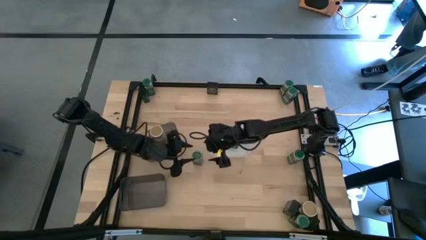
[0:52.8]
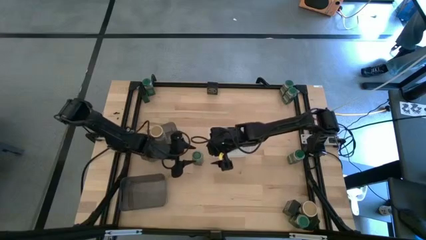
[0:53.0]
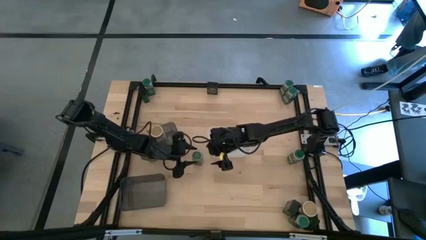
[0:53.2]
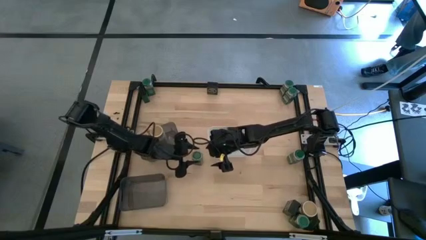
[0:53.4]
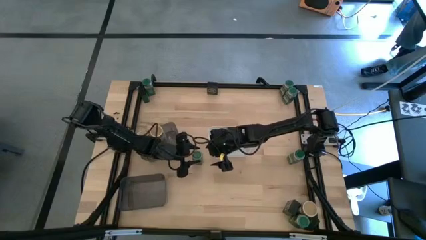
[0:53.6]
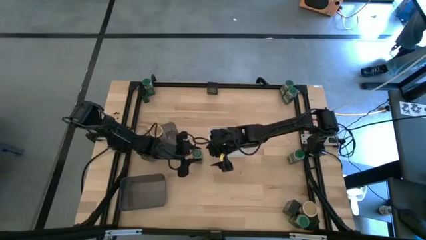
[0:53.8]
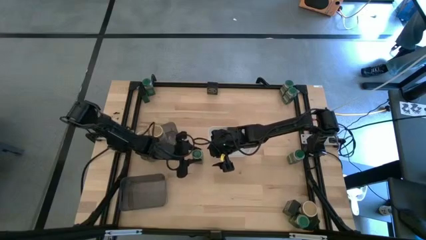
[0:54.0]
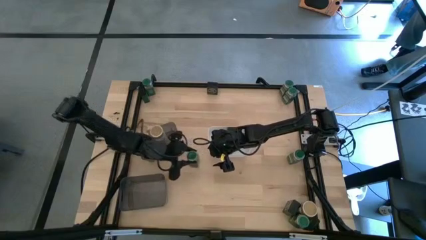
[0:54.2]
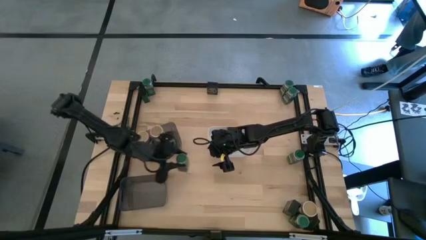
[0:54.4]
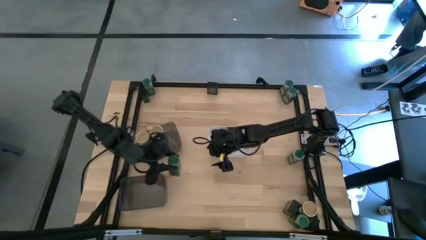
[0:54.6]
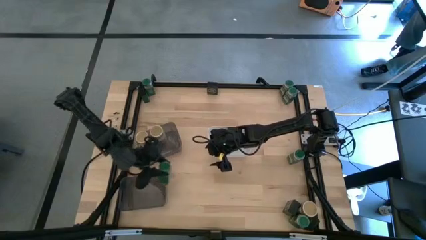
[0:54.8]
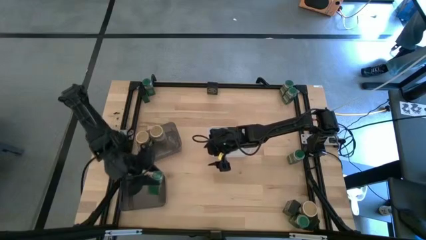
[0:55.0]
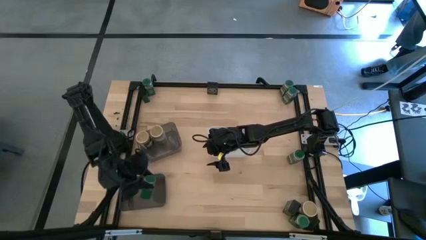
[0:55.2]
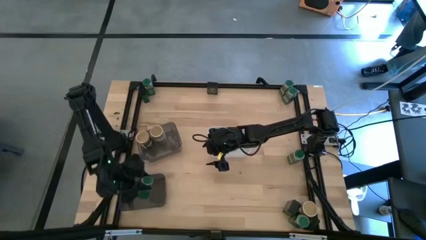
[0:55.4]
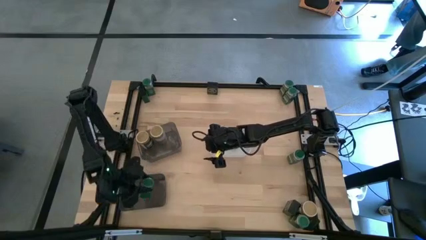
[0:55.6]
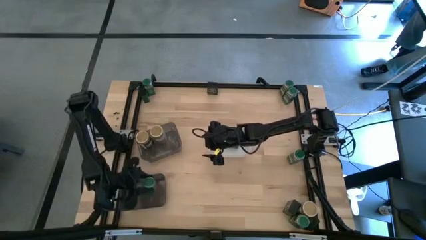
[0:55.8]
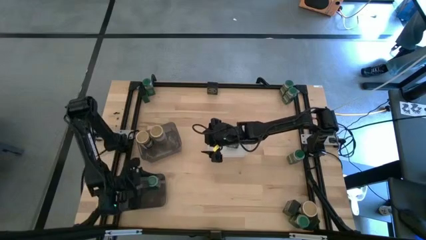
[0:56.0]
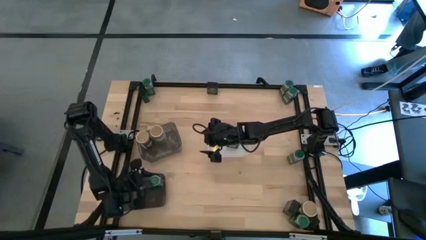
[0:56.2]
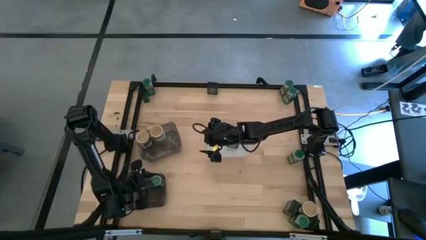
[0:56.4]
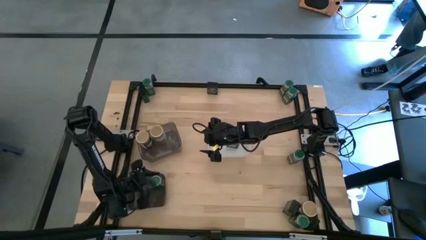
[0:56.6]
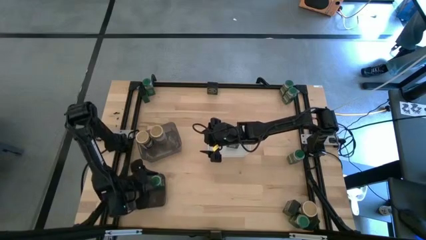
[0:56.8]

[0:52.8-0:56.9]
Task: Sort spices by type
Put the green seasoning bottle into the bottom black bin

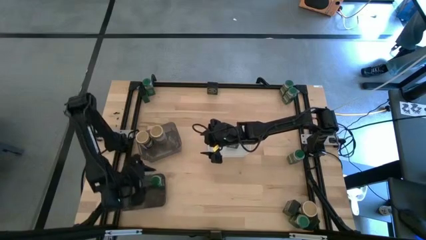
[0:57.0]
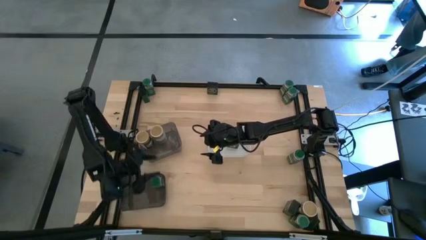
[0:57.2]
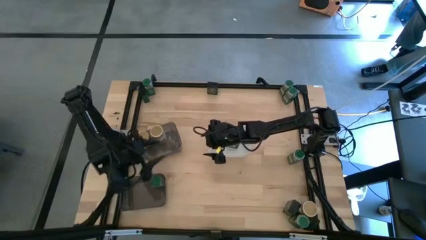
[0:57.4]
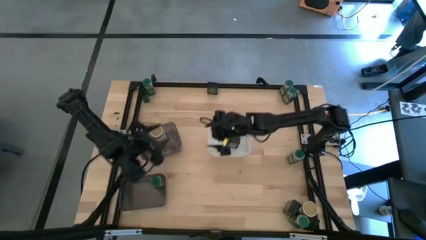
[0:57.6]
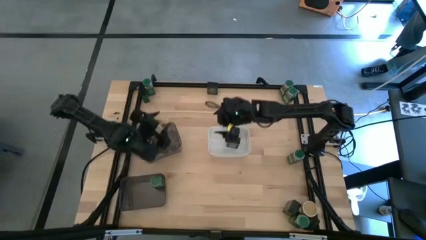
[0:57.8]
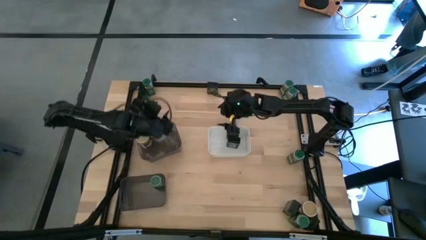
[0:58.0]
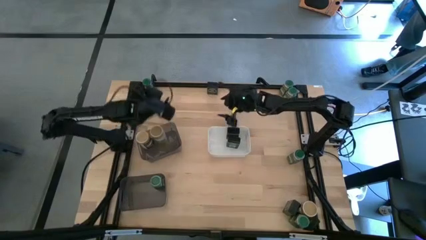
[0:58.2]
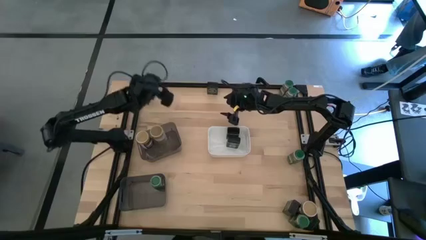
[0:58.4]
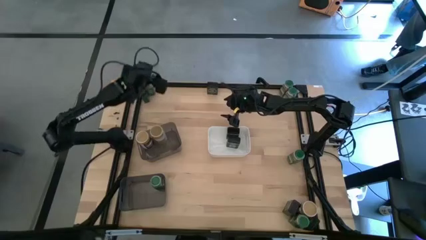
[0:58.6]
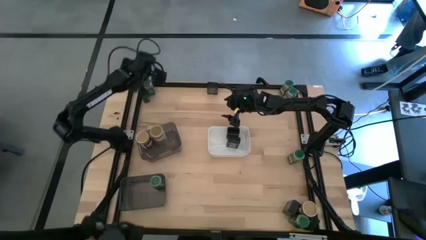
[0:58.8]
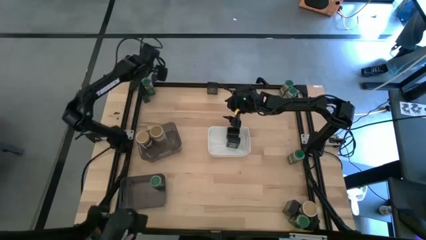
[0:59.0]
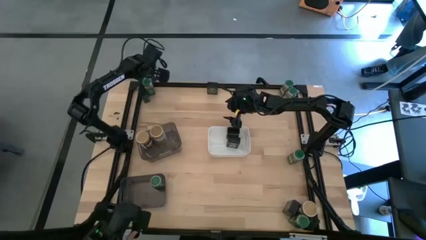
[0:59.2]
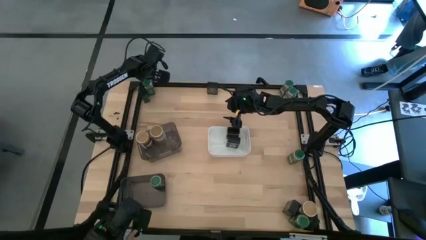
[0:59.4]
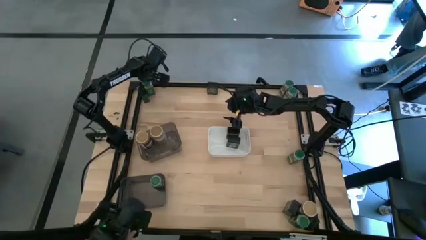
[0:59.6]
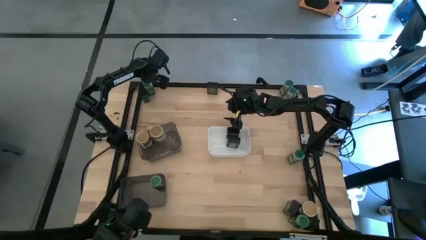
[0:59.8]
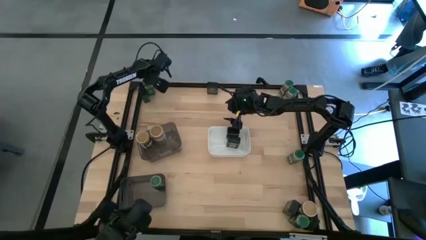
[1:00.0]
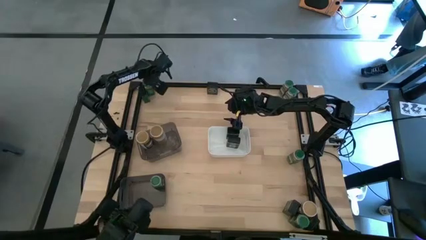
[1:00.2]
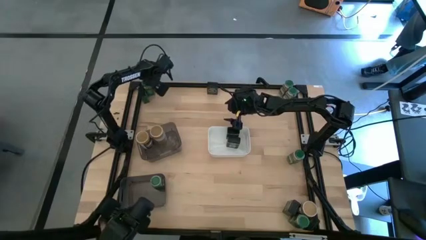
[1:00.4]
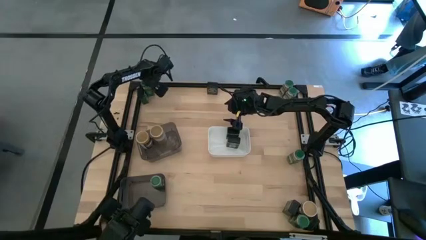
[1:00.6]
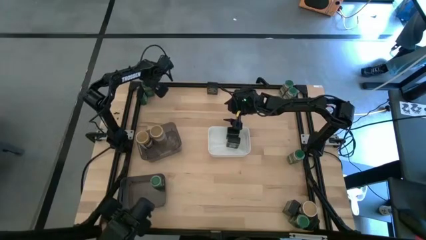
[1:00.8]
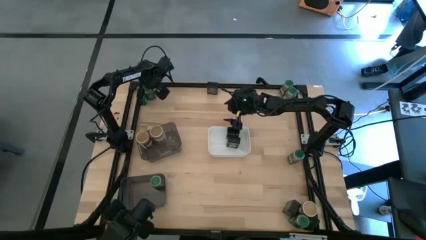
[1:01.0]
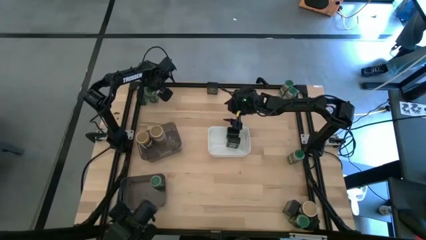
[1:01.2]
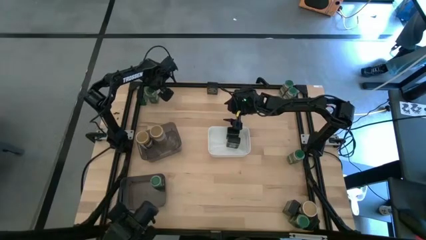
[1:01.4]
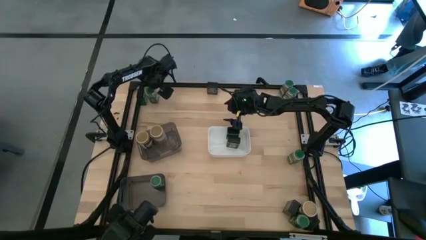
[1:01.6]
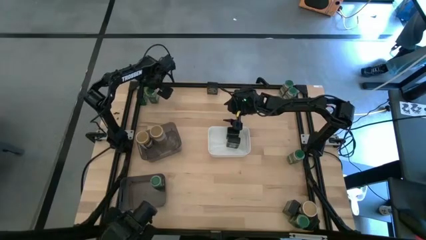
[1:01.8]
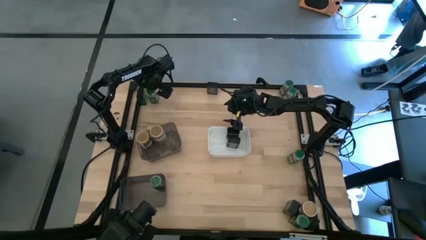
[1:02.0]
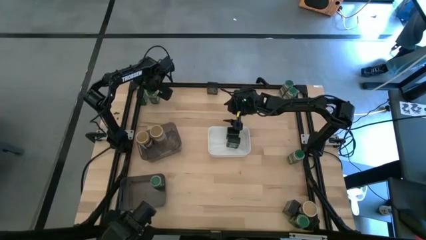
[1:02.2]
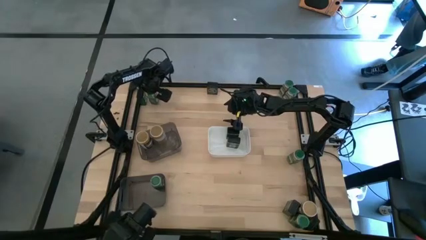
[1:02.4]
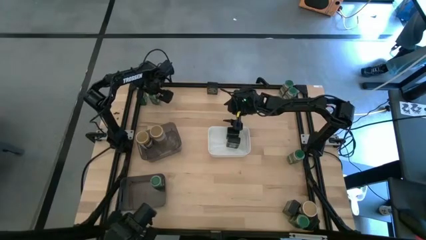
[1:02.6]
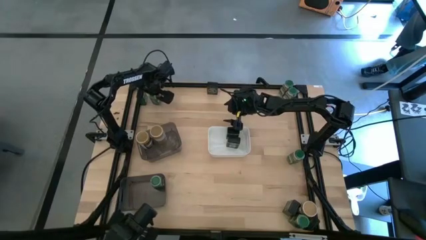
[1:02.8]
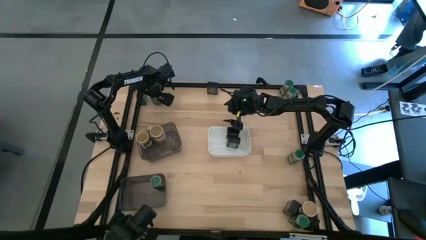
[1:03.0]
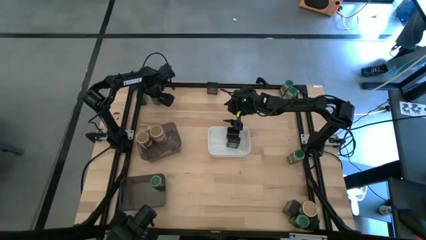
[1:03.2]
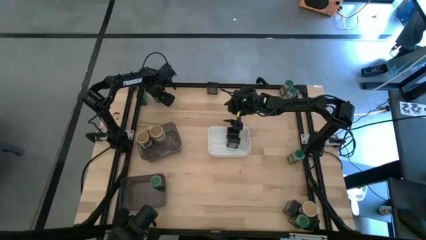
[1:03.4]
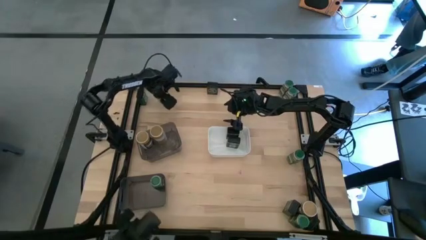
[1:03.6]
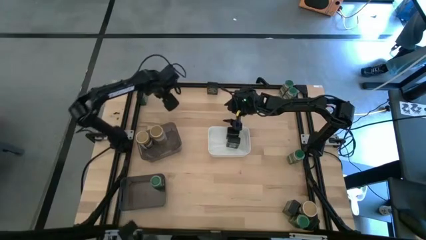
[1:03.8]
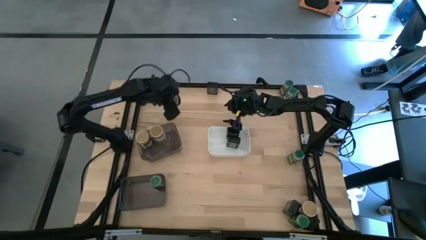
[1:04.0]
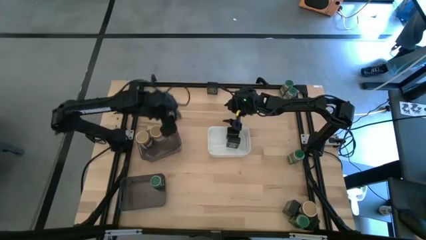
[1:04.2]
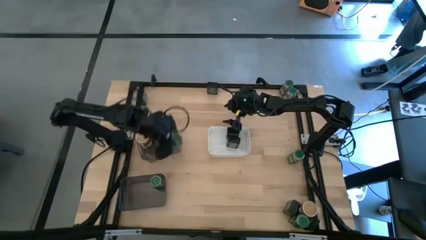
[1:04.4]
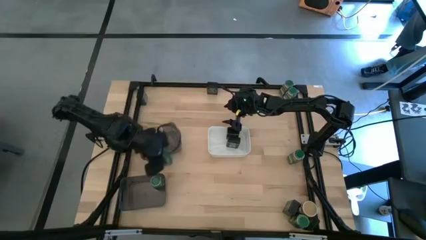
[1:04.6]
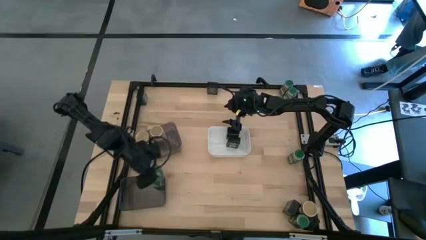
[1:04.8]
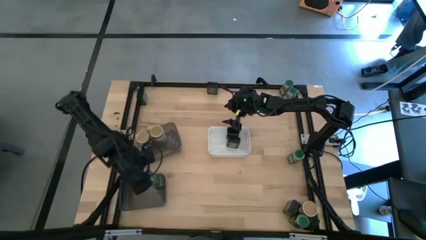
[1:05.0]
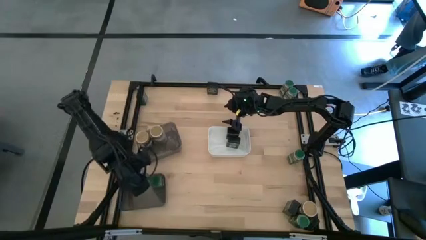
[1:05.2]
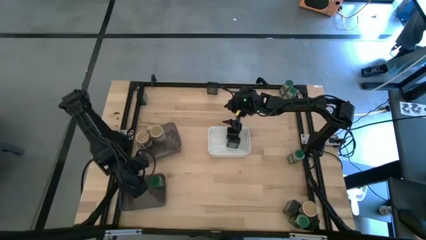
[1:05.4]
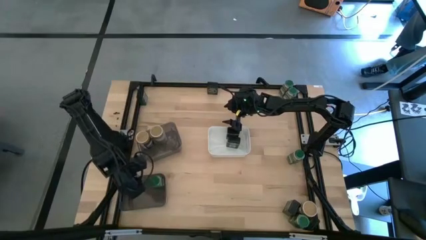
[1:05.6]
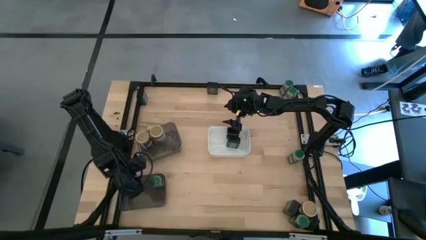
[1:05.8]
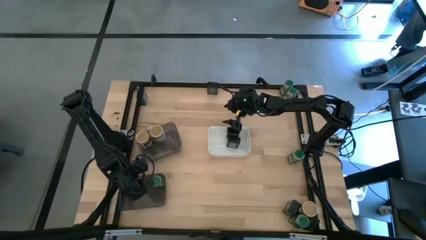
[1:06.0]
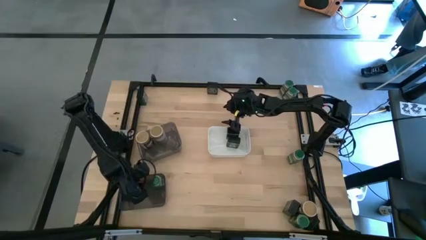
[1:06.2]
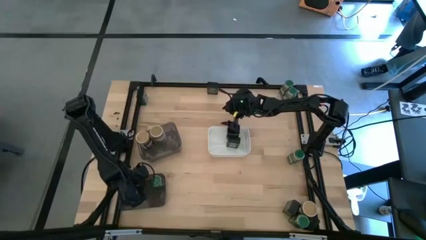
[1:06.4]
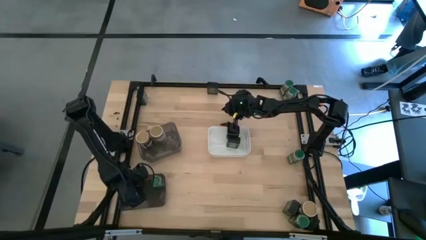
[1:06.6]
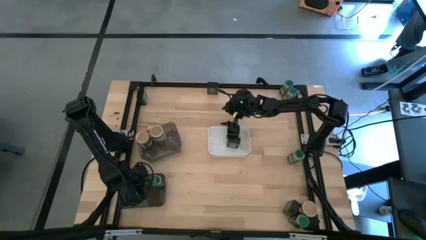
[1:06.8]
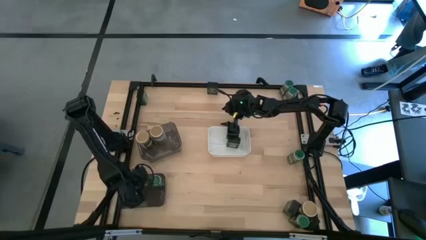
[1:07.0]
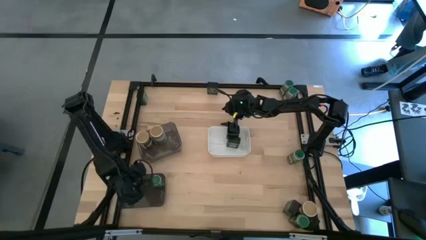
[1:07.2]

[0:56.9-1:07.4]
Put the green seasoning bottle into the bottom black bin
